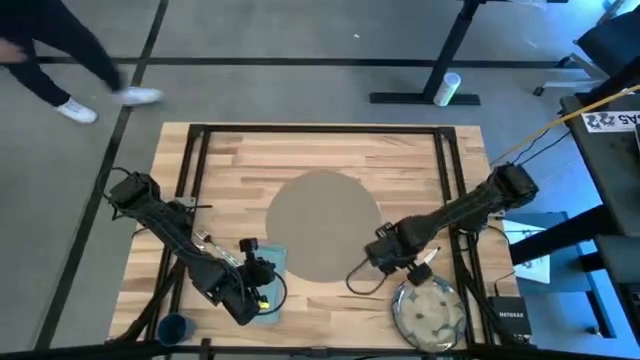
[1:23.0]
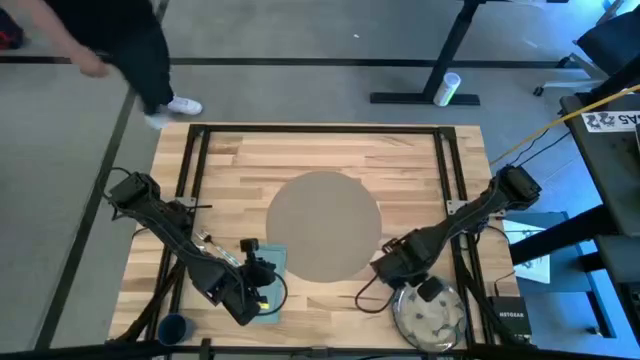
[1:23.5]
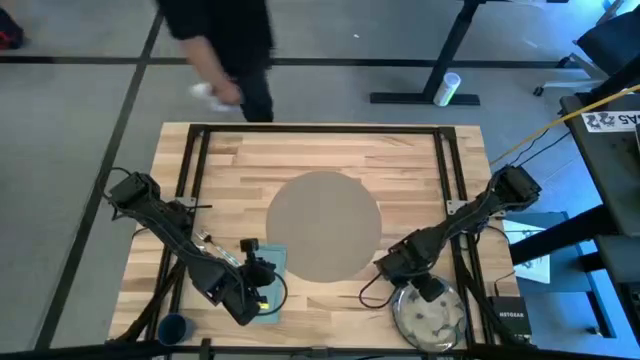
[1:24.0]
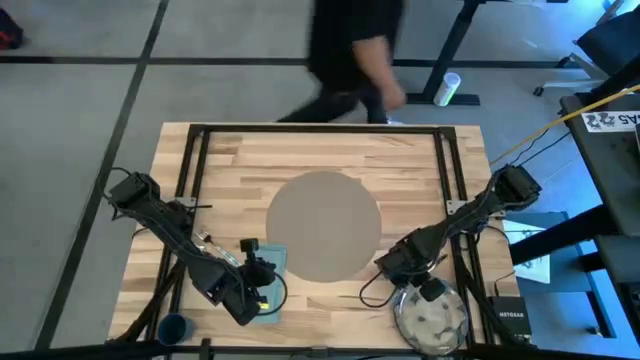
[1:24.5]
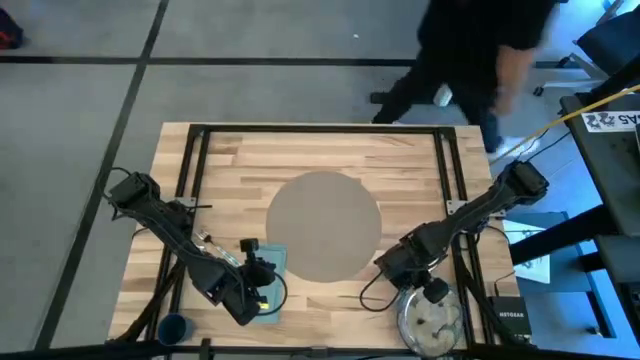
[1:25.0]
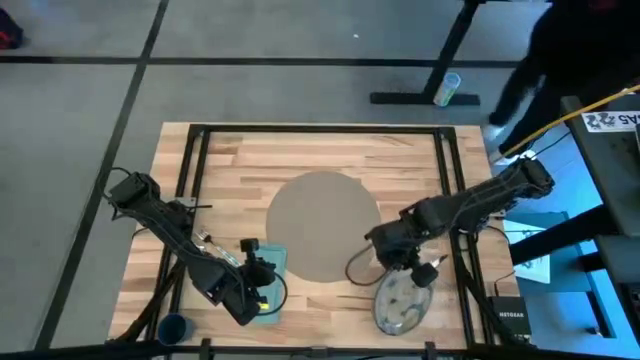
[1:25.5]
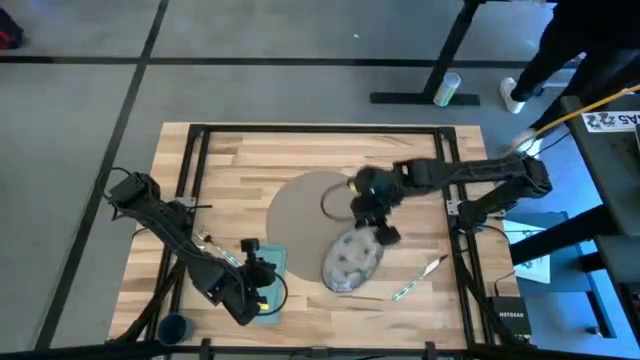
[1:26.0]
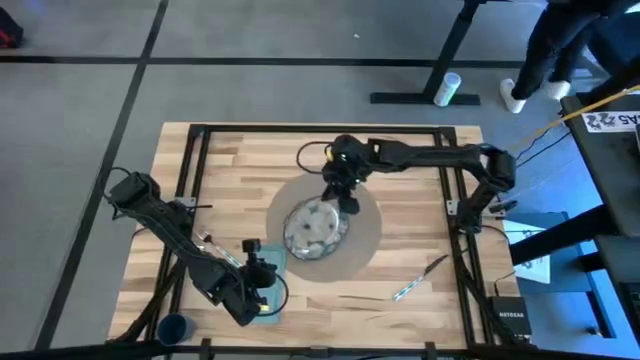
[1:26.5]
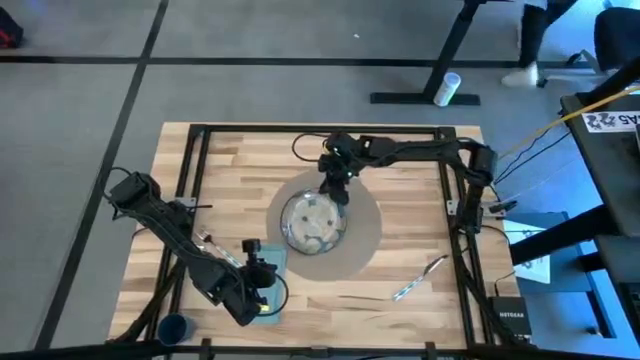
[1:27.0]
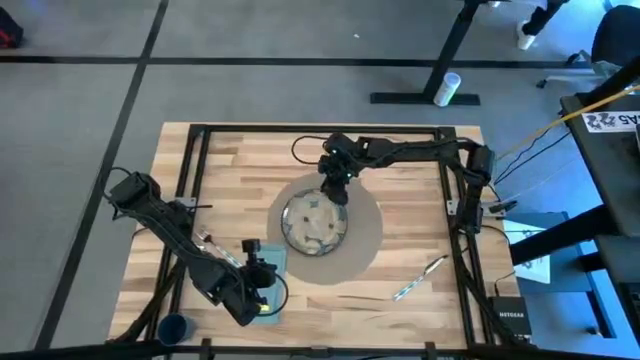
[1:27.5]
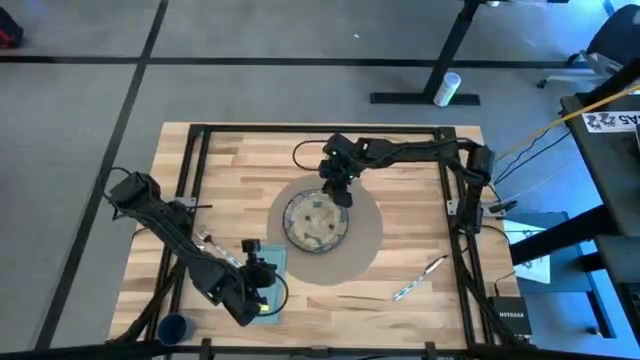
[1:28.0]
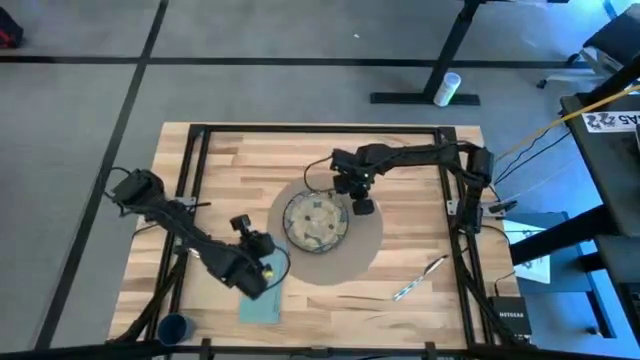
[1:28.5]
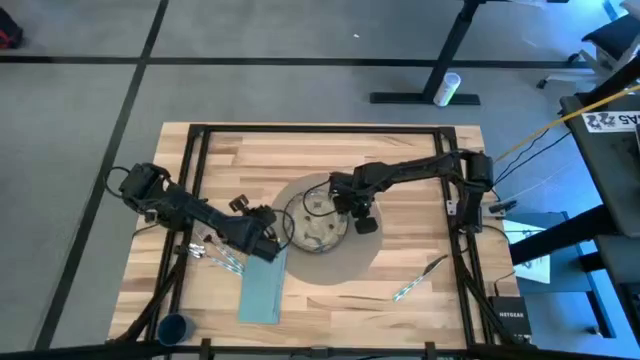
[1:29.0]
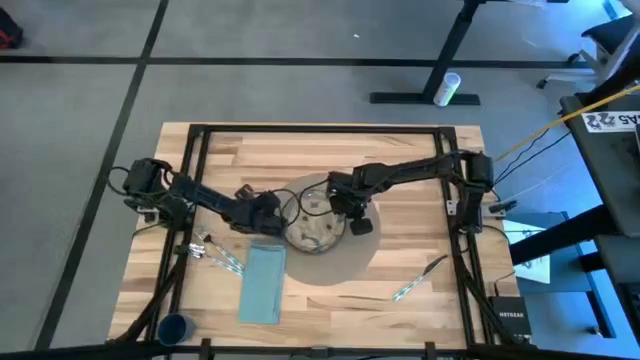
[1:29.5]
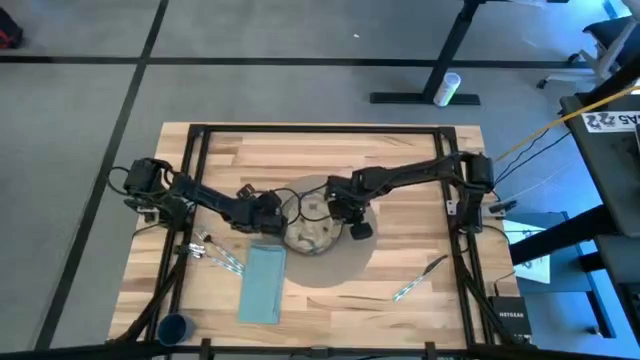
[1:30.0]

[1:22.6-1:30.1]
Task: Set table place
Put the white patterned plate on the brown tablemat

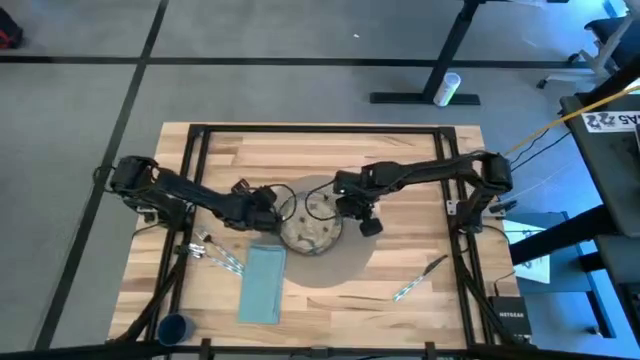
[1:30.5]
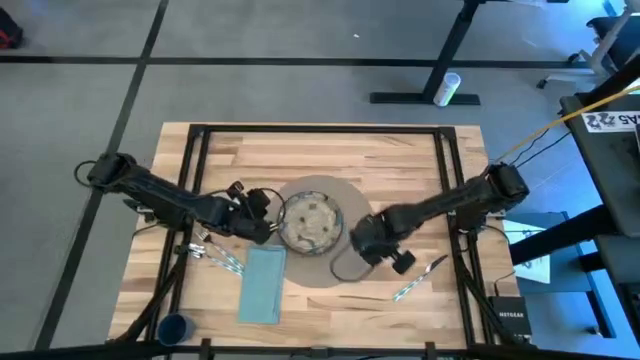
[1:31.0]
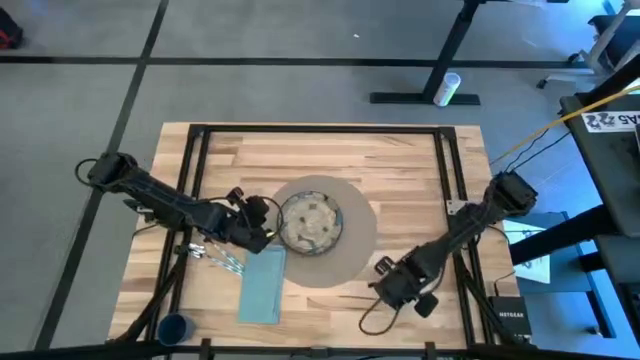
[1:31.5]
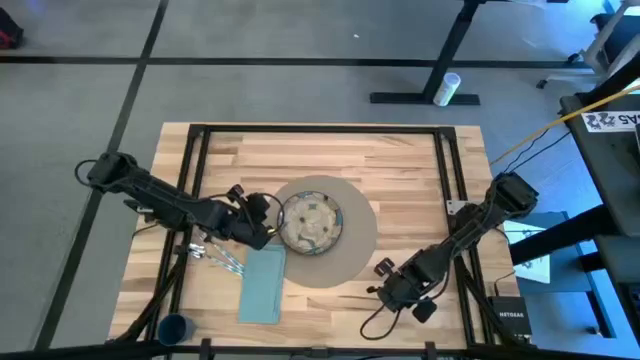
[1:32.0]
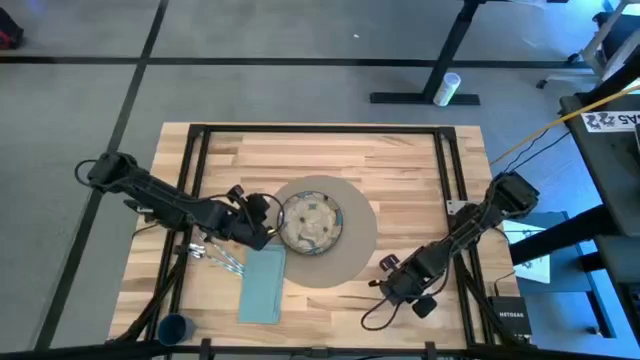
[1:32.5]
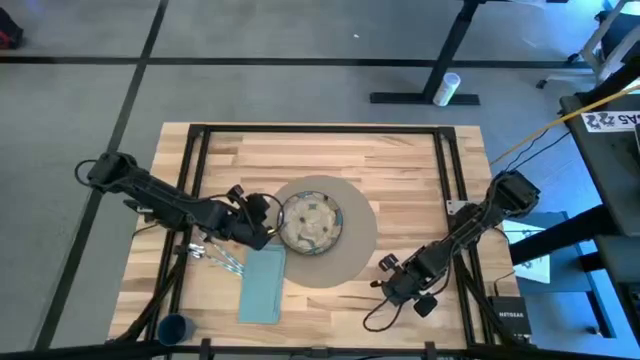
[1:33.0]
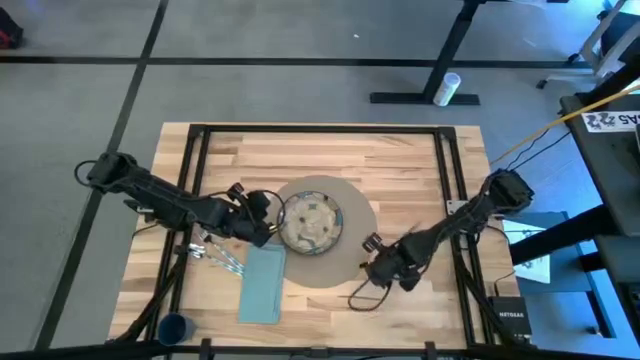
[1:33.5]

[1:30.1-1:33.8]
Put the blue patterned table knife on the brown tablemat to the right of the white patterned plate

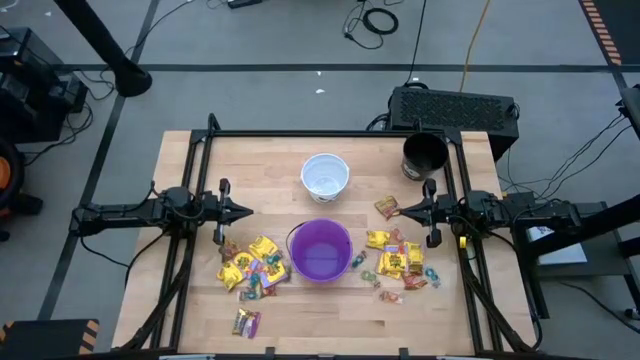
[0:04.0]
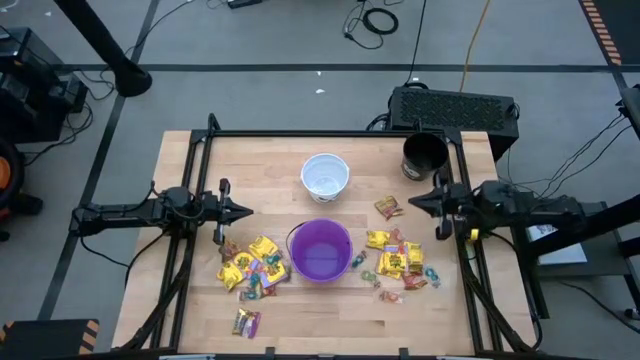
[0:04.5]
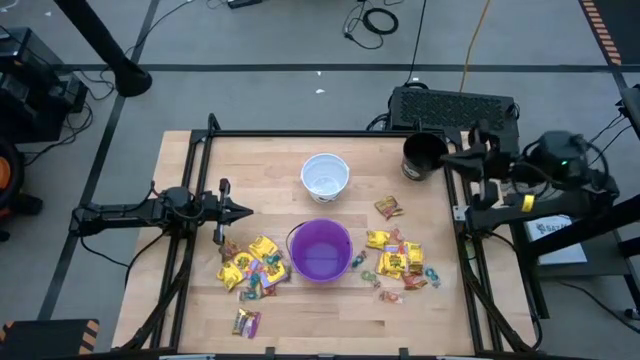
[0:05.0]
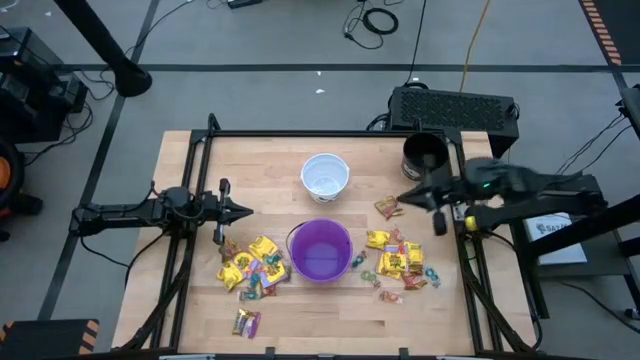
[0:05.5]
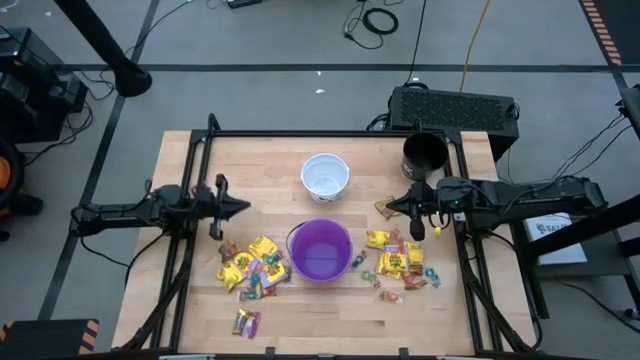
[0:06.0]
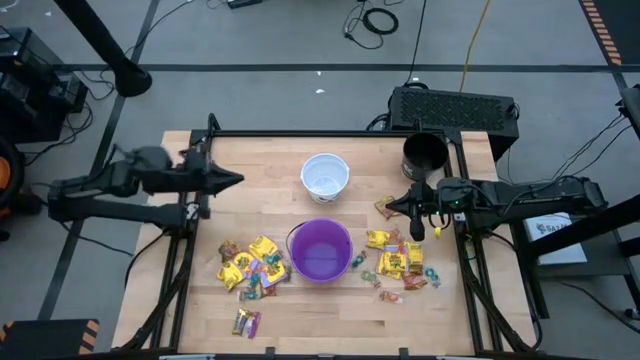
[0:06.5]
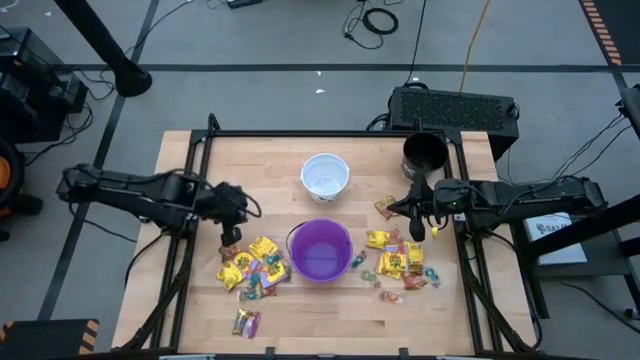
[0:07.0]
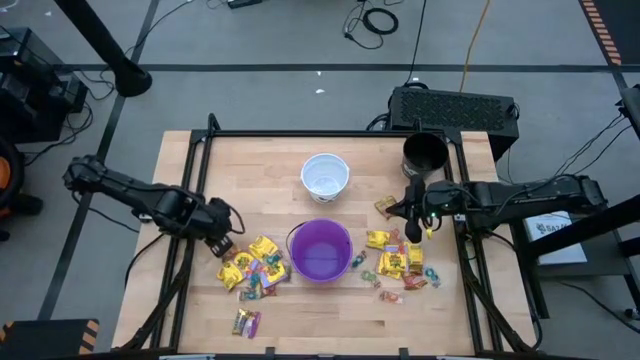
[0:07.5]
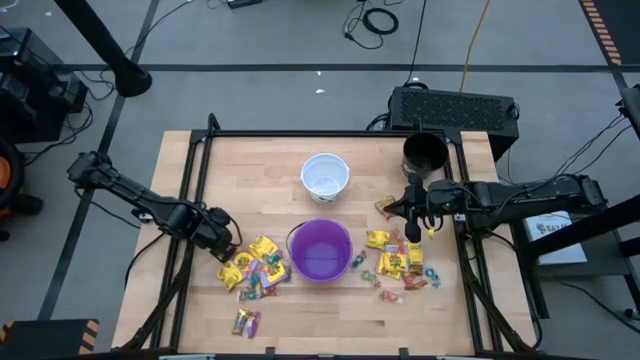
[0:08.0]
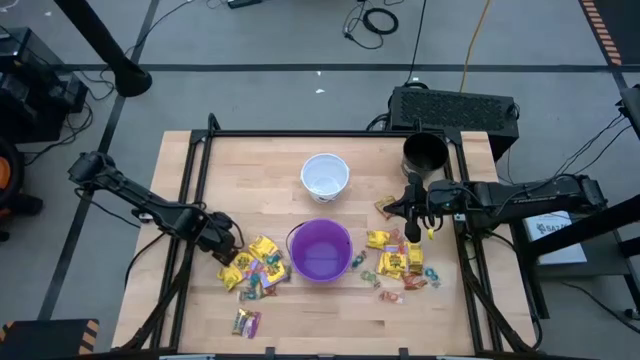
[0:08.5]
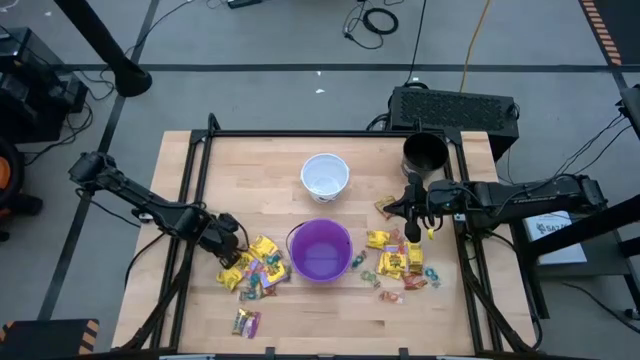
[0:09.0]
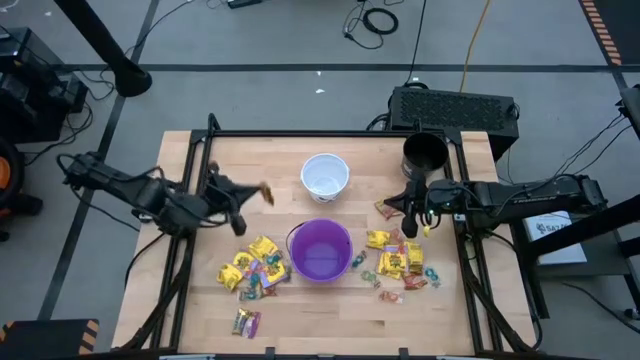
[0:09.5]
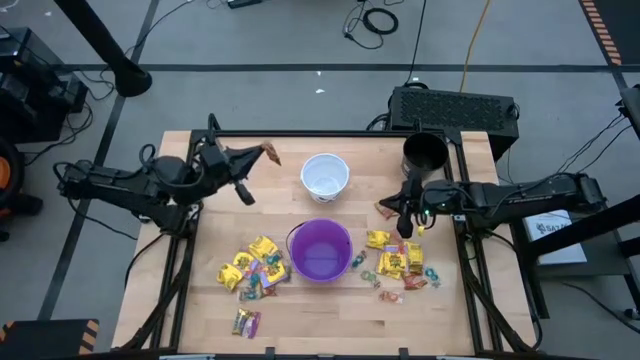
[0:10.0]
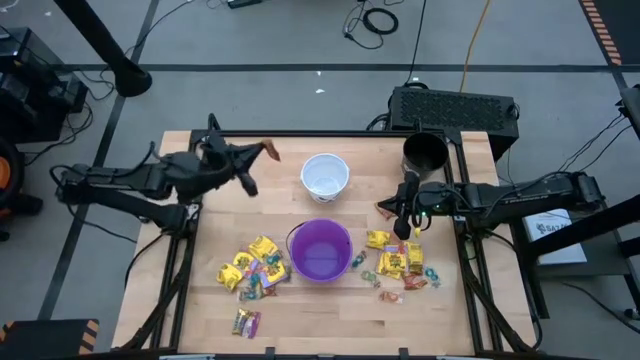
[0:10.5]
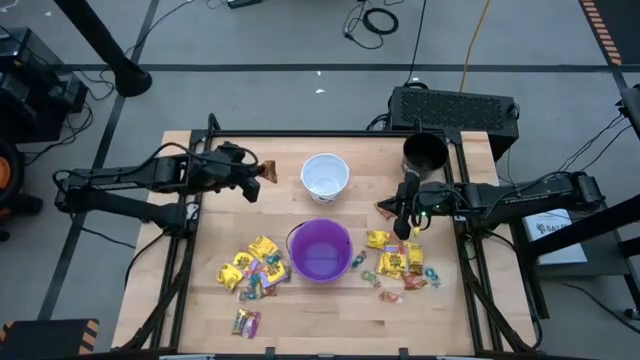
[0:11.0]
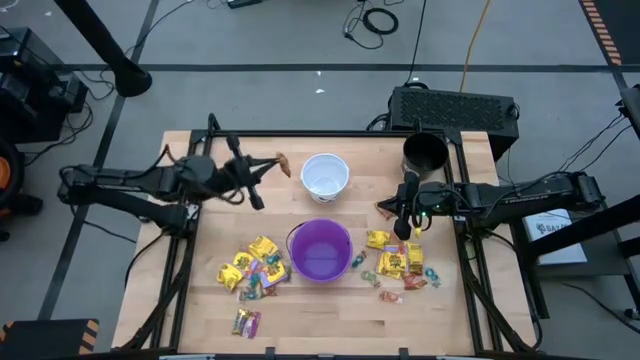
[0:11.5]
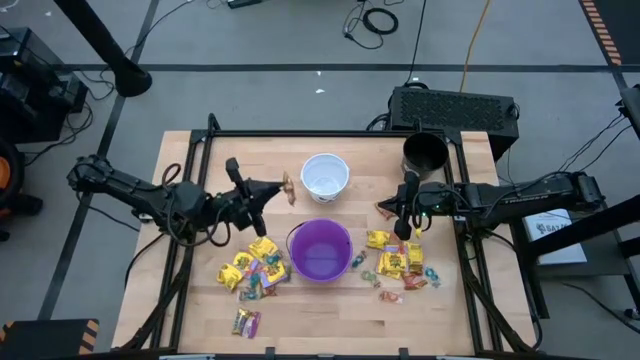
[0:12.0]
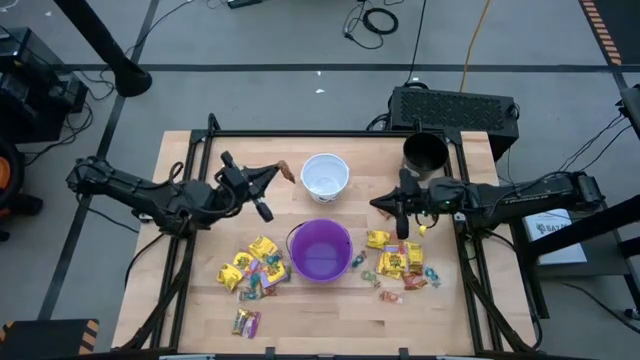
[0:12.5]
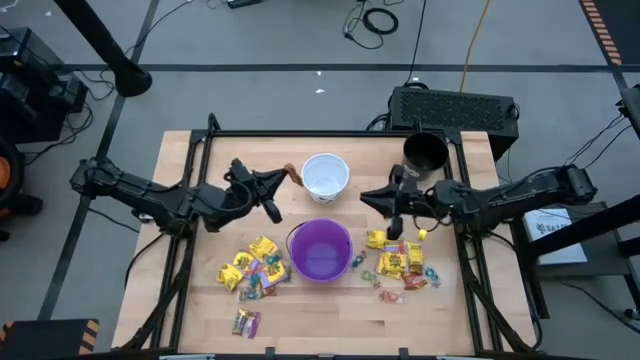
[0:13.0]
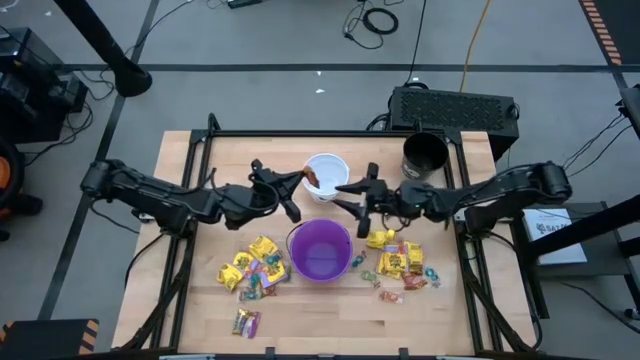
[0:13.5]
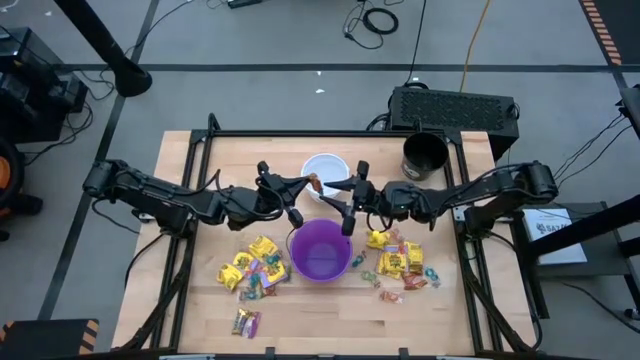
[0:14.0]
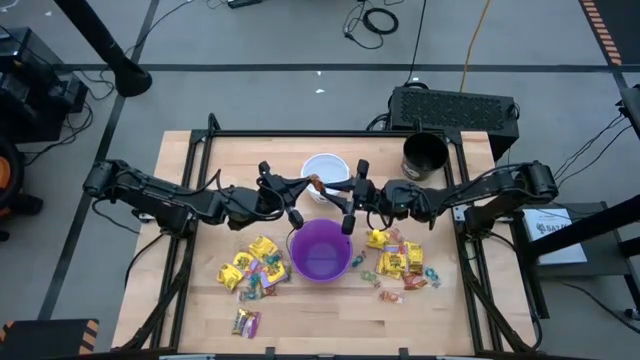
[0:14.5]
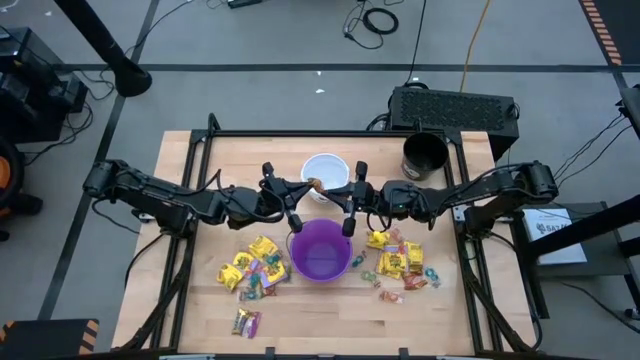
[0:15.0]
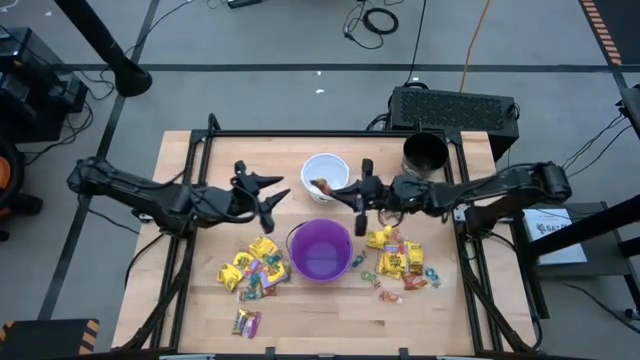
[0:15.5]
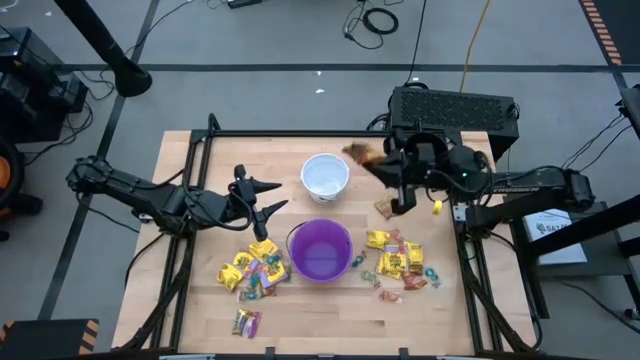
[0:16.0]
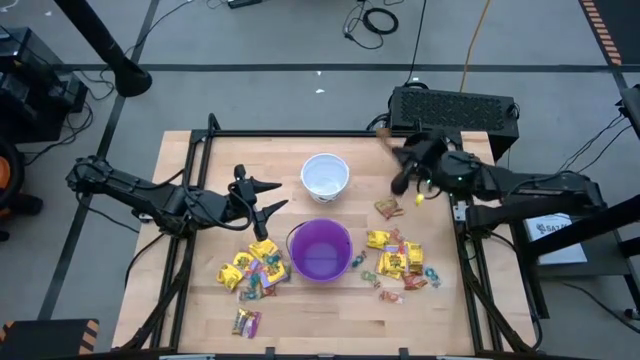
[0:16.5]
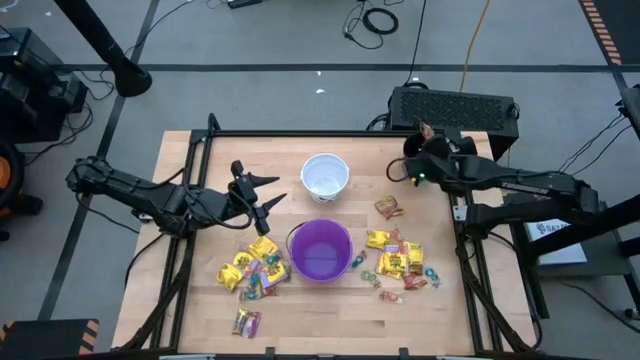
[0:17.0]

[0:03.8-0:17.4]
Task: Sort candy by brand, put in halloween buckets
Put the gold candy into the black bucket
